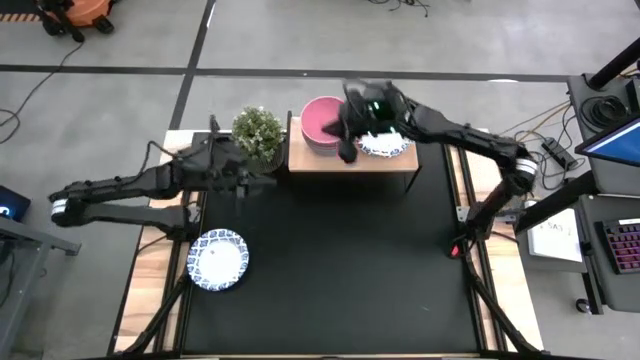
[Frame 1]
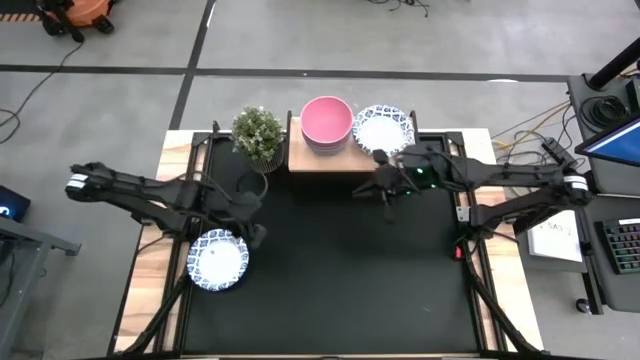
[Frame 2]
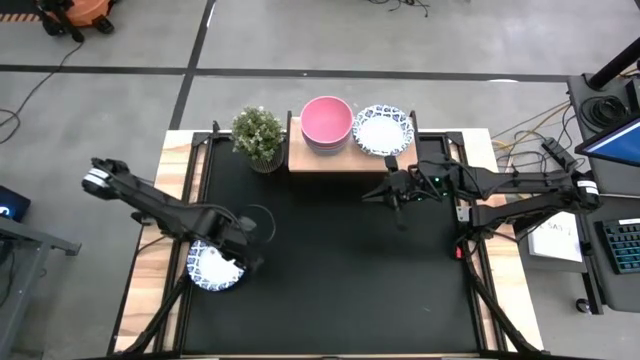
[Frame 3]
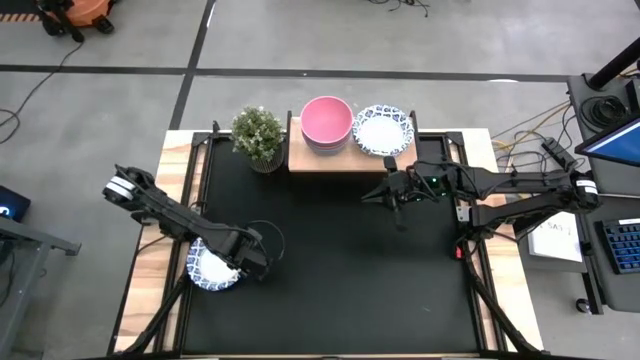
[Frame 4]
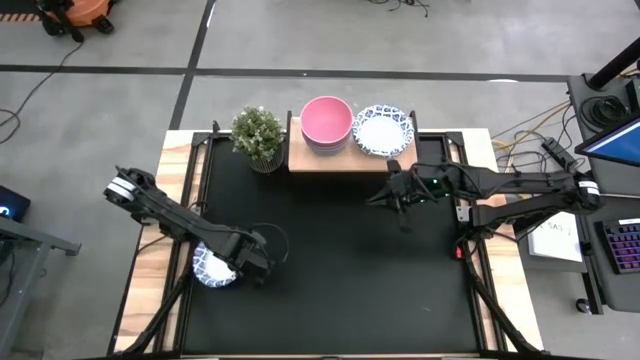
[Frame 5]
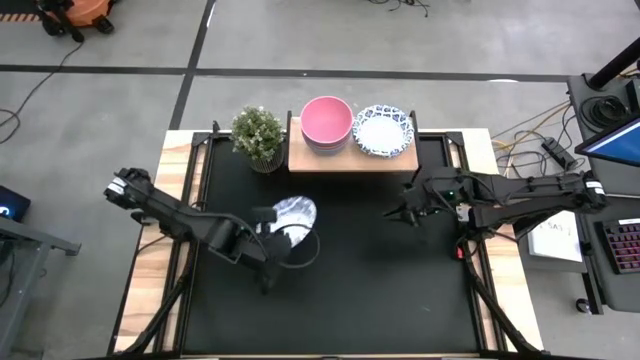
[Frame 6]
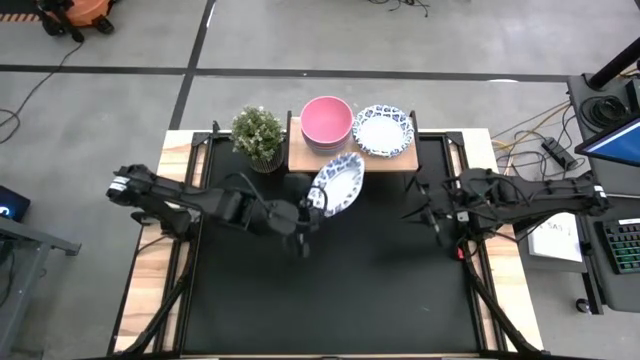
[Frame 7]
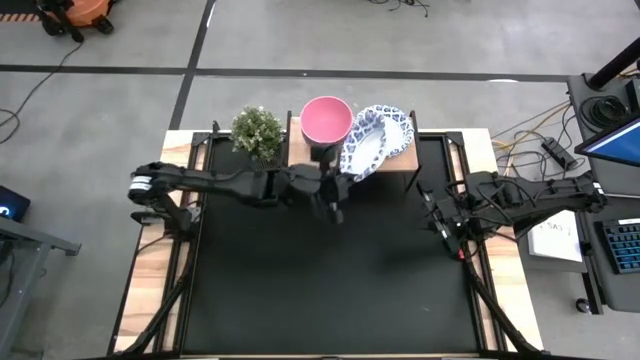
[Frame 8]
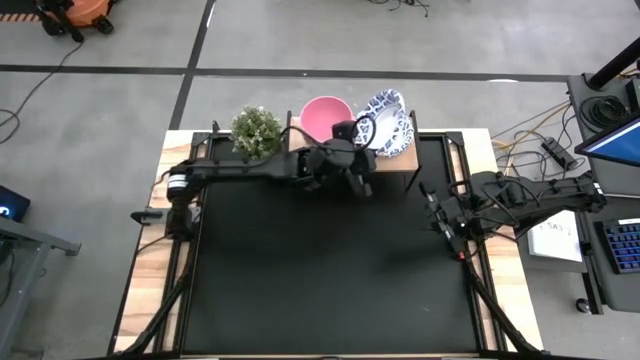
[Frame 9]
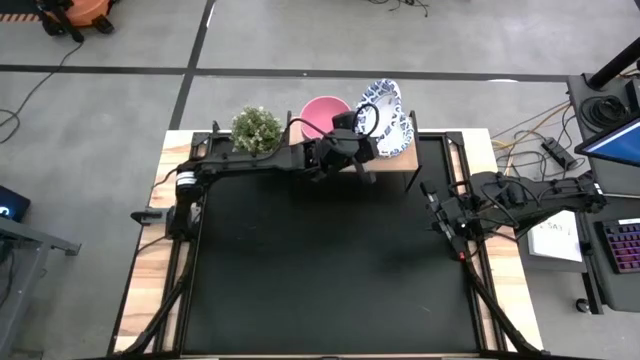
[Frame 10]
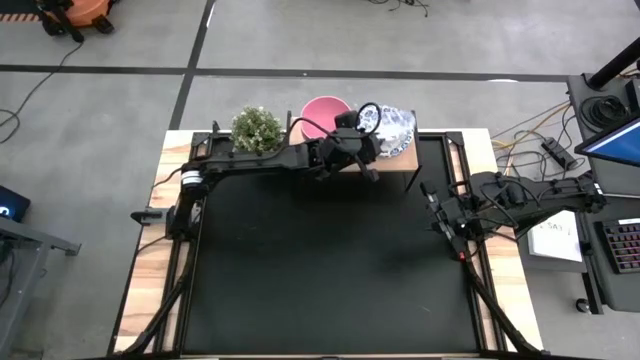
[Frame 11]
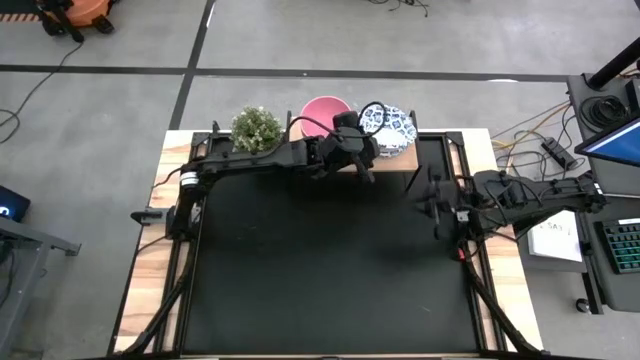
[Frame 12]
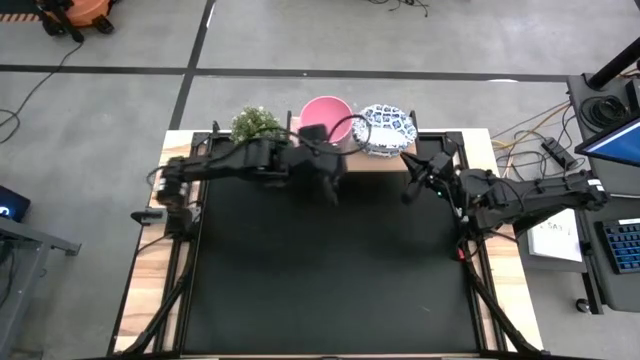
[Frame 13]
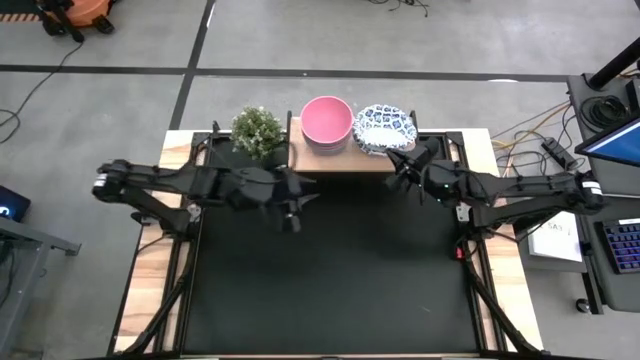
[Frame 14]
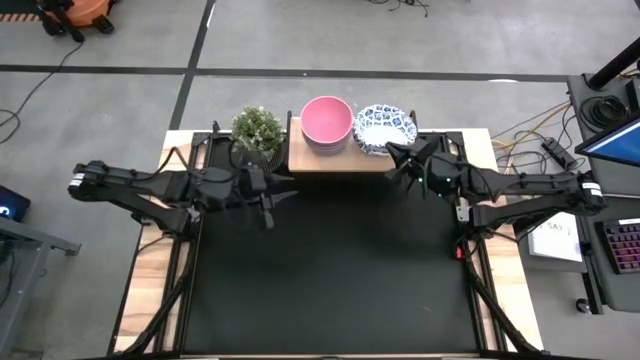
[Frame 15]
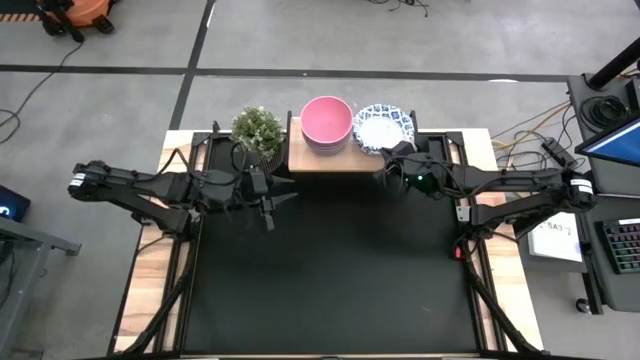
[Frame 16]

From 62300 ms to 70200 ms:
Task: Place and stack bowls onto a shelf
Stack the white patterned bowl on top of the white patterned bowls

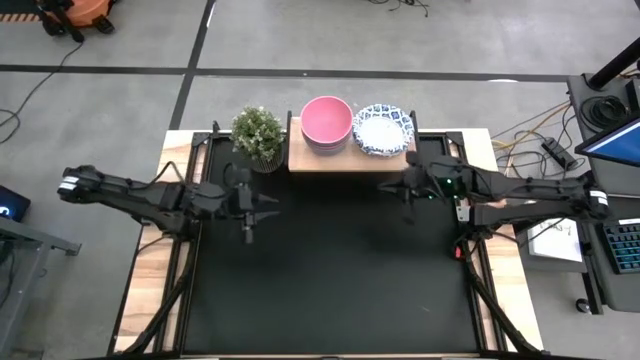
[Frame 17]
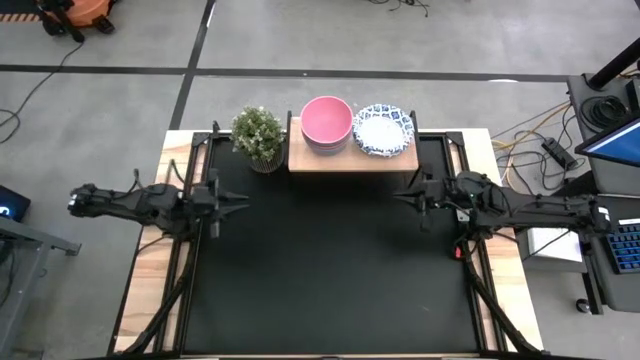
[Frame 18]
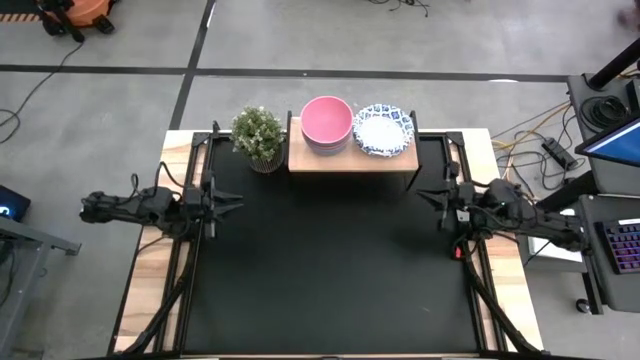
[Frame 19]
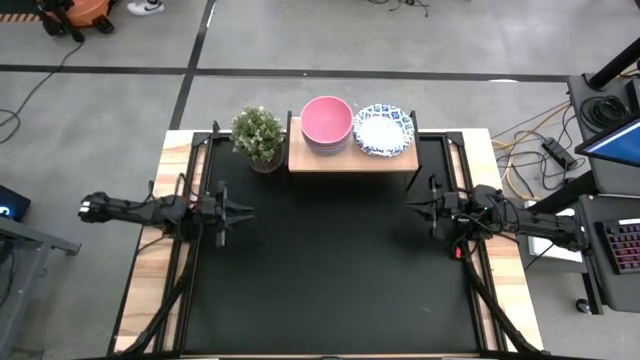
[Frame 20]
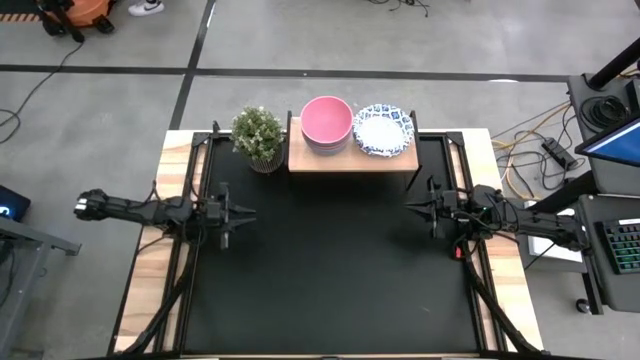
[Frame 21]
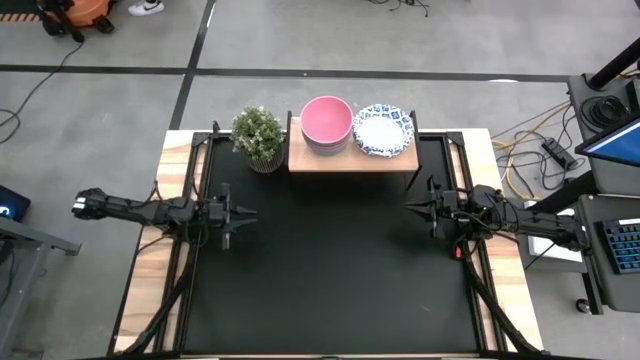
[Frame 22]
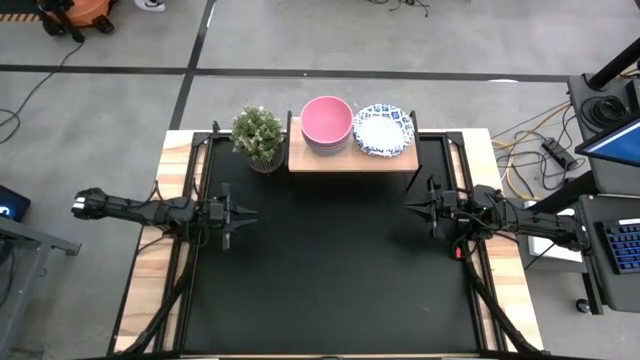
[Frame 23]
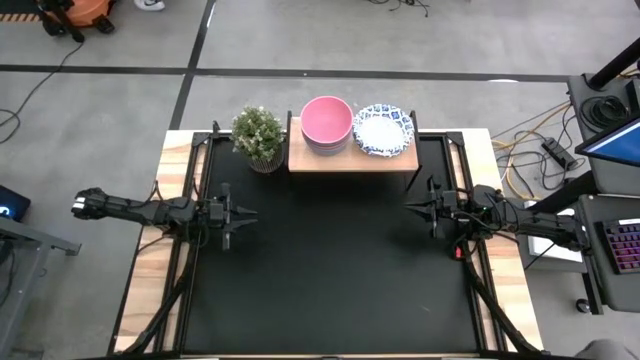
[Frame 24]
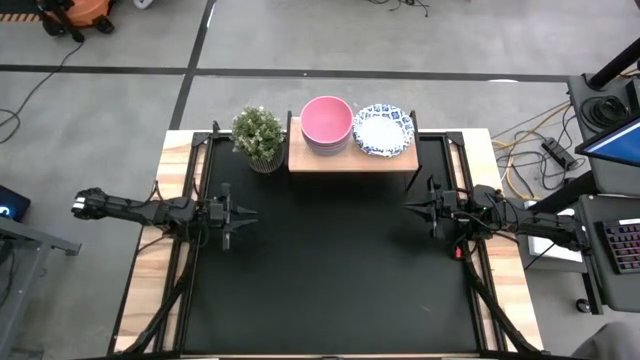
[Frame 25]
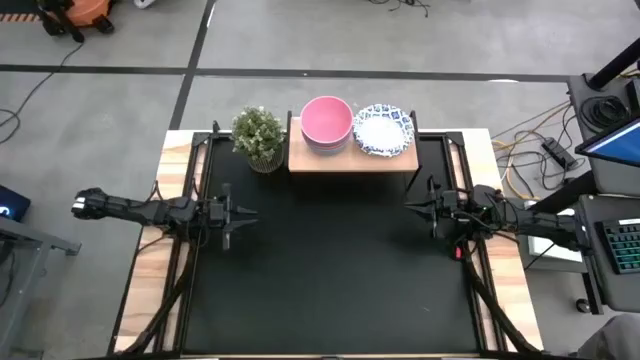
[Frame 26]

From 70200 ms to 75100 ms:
Return to Home Position

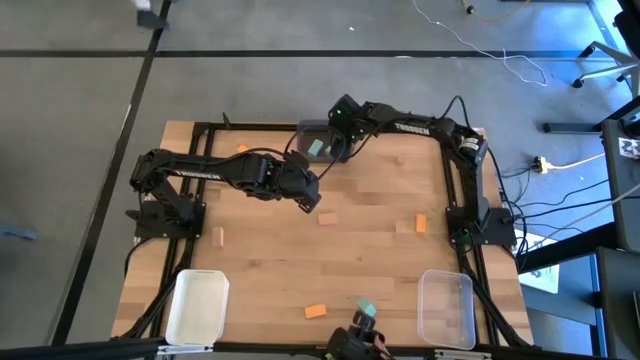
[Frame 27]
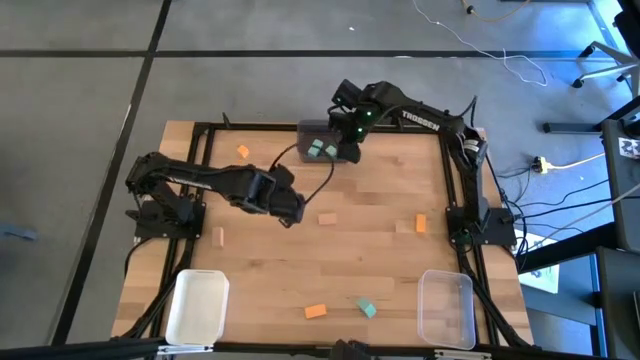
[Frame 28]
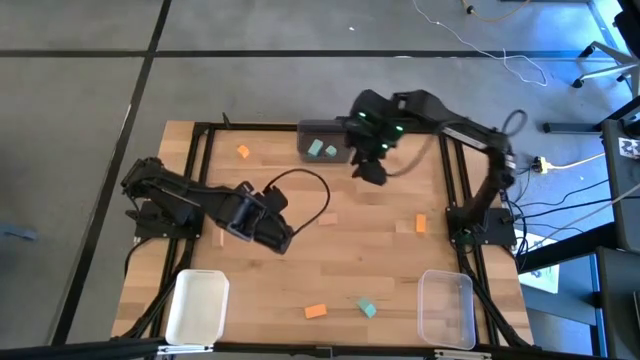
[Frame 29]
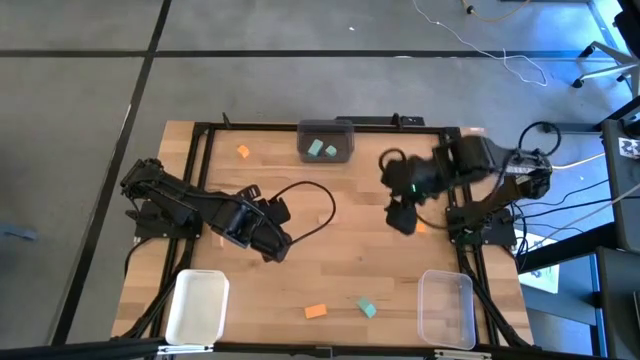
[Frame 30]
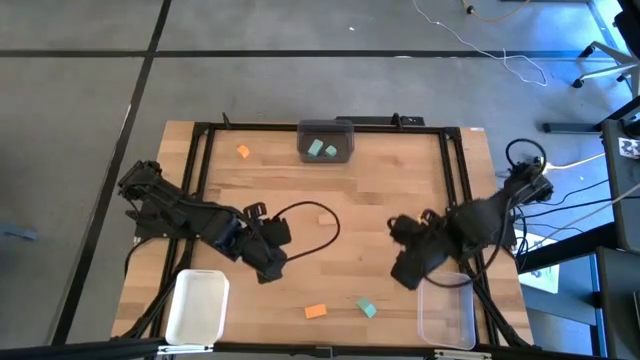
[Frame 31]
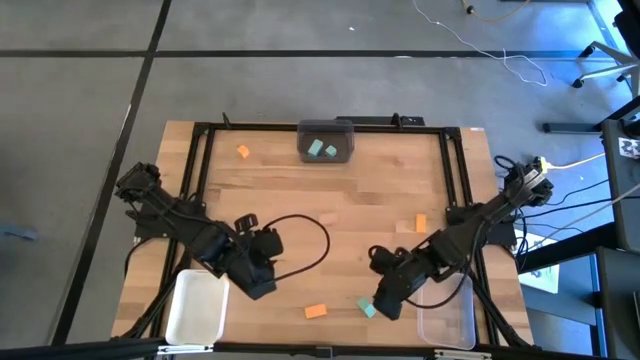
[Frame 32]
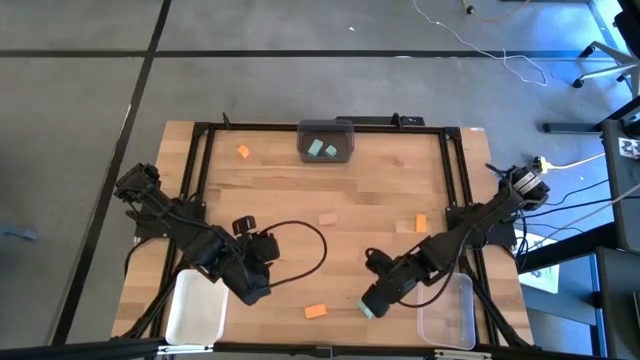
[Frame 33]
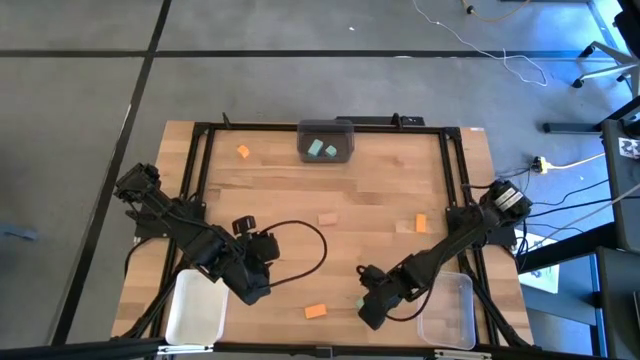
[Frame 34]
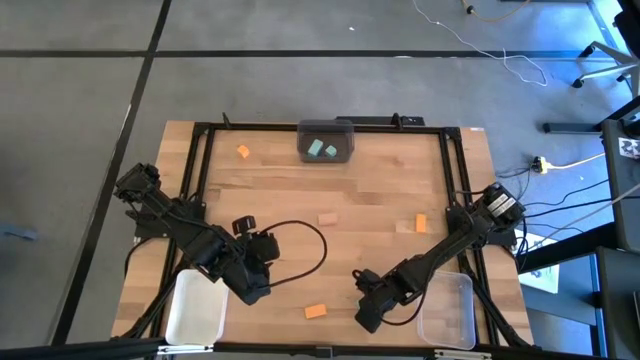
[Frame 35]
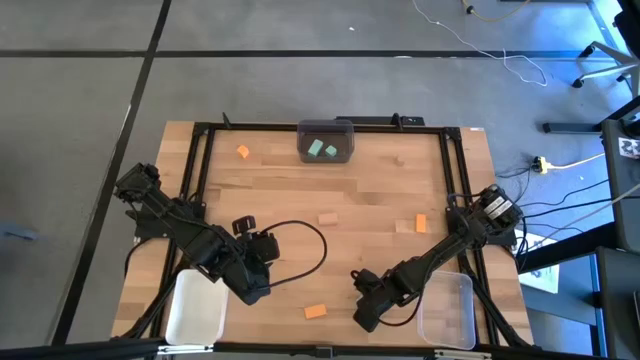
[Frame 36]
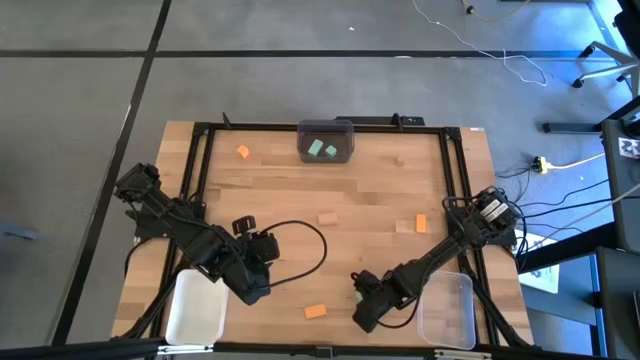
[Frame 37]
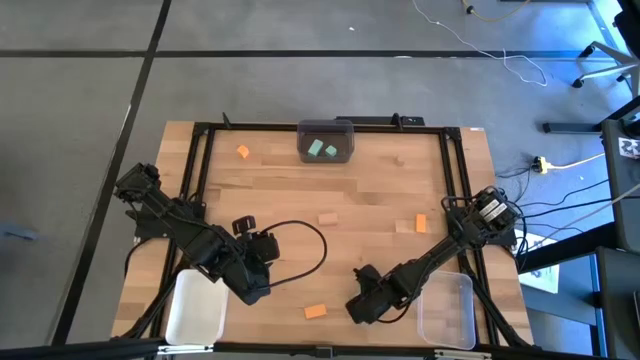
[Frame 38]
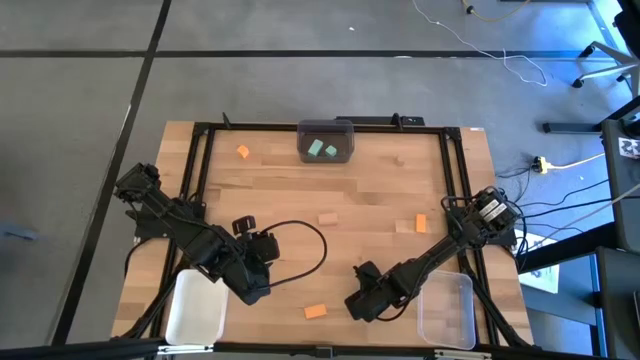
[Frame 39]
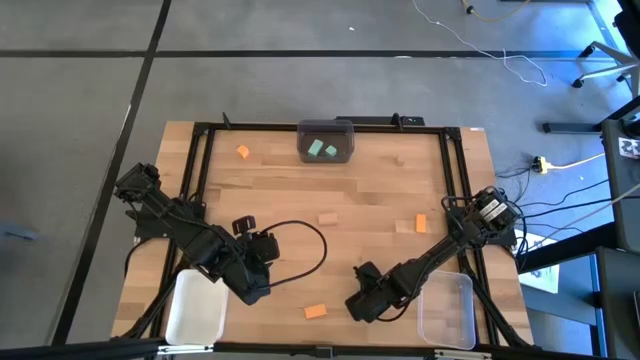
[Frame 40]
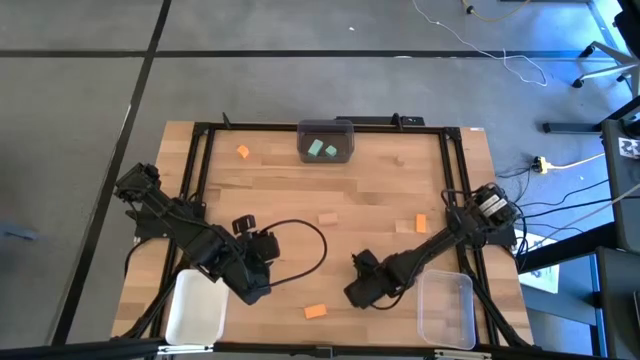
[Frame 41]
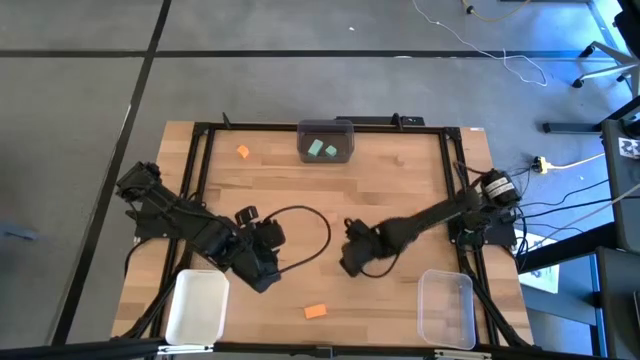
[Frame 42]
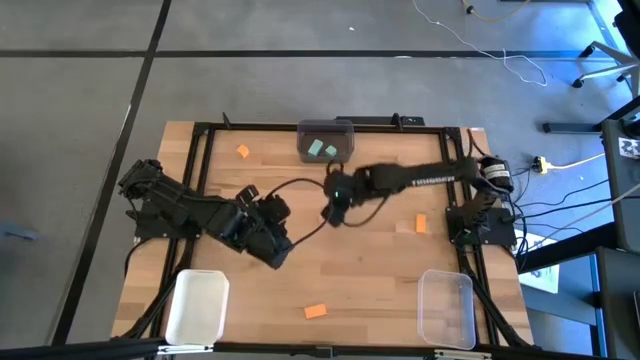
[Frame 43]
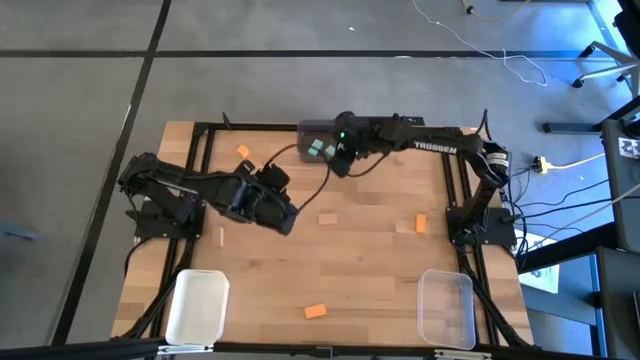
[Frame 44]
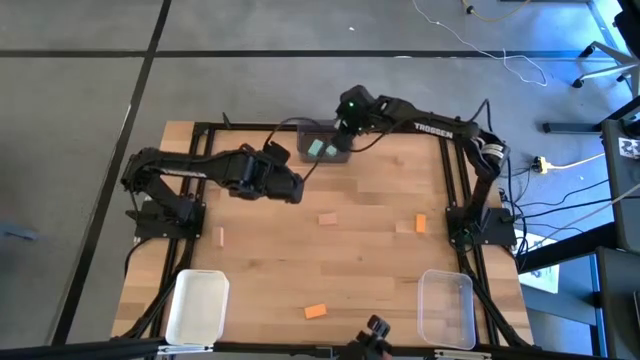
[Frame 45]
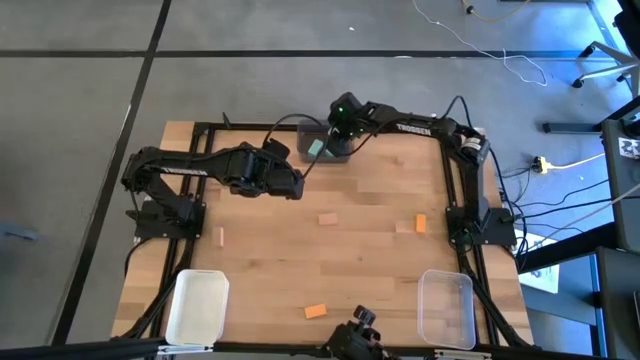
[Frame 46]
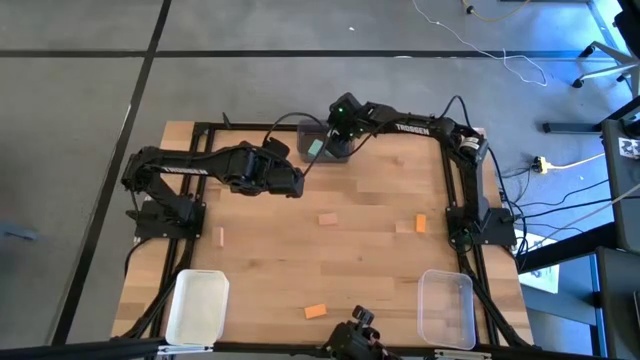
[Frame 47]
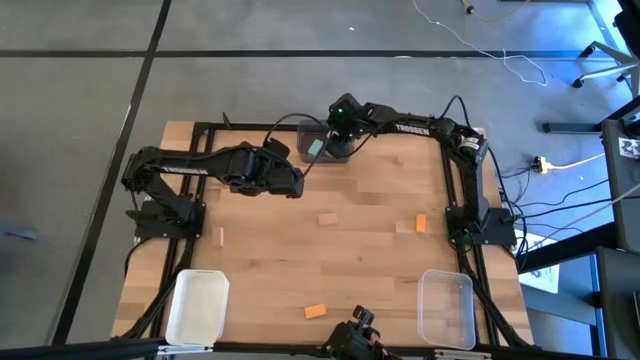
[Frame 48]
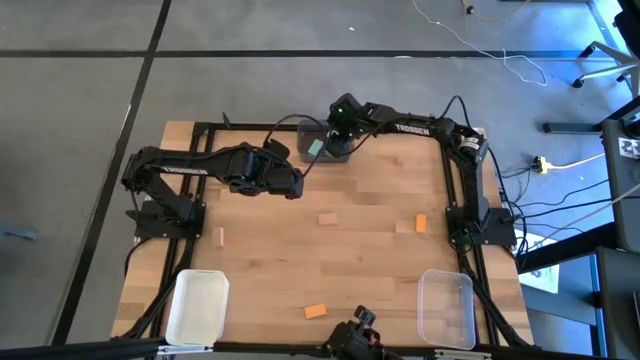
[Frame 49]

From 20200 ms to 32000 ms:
Task: Sort & place blocks by color
Put the blue block into the black bin
